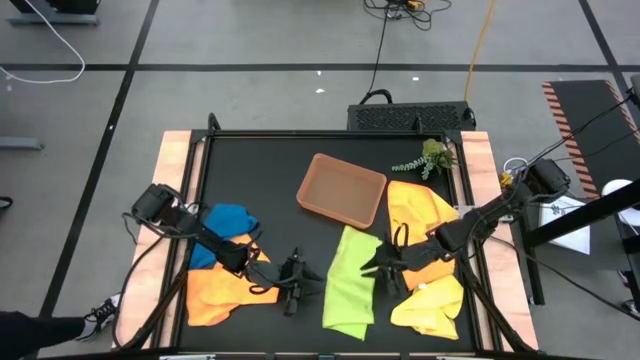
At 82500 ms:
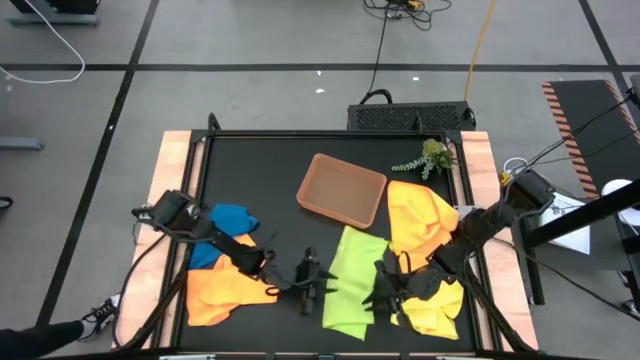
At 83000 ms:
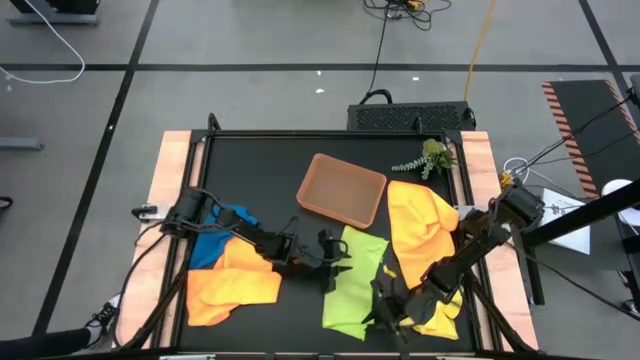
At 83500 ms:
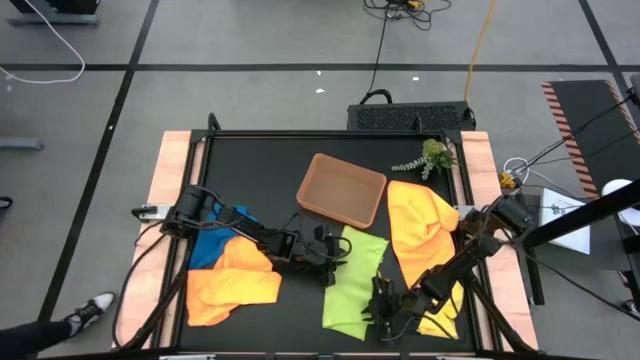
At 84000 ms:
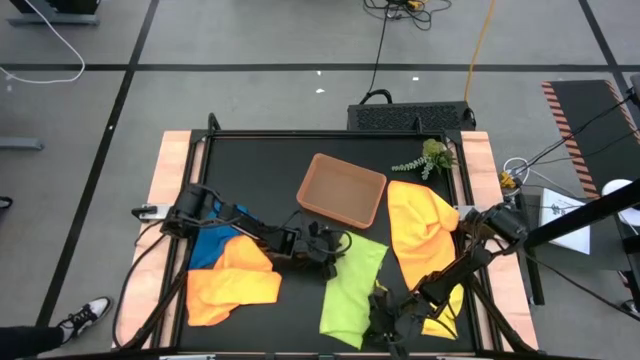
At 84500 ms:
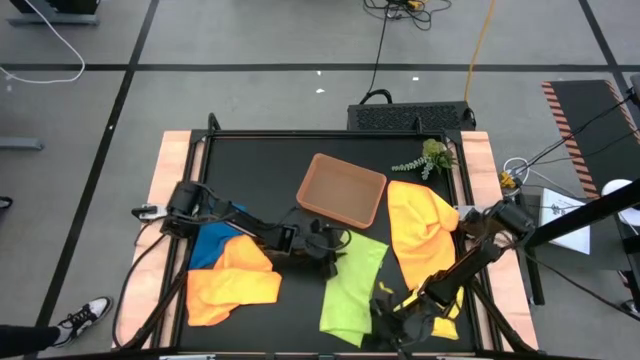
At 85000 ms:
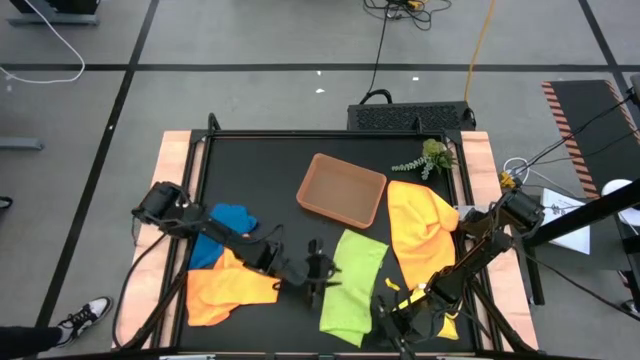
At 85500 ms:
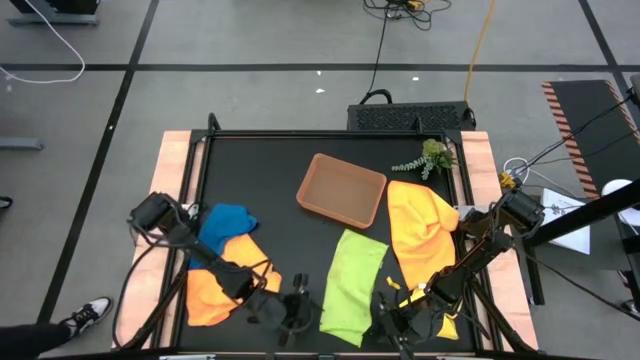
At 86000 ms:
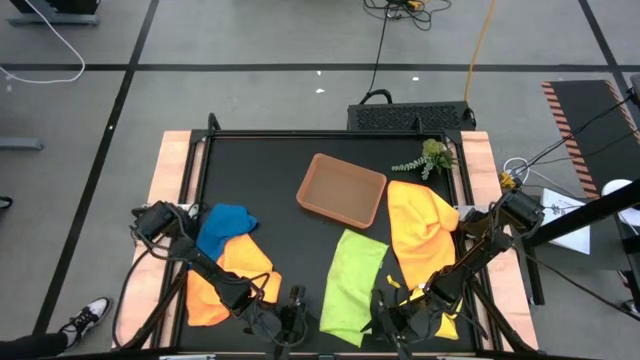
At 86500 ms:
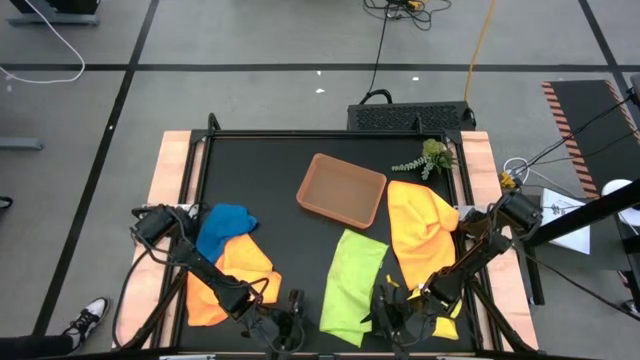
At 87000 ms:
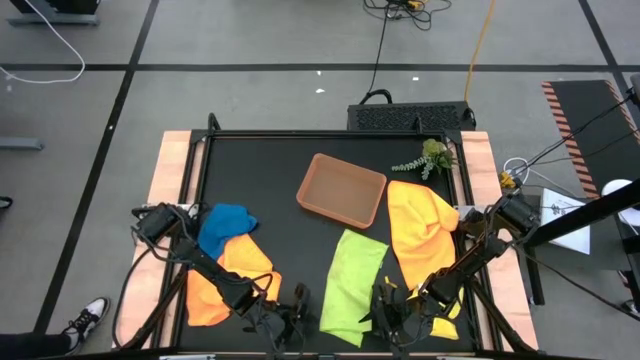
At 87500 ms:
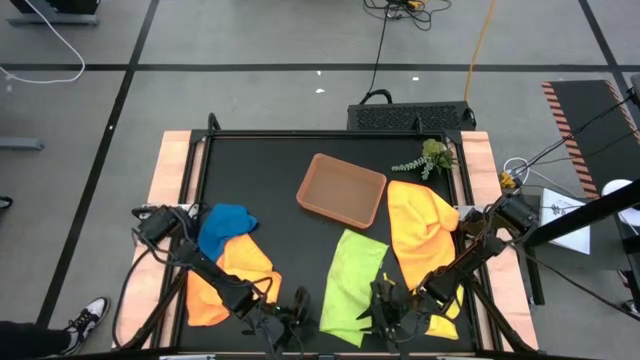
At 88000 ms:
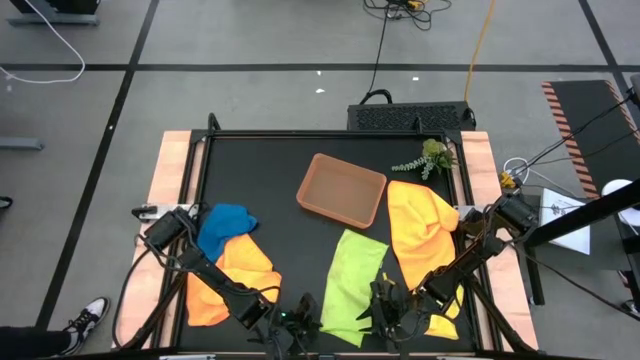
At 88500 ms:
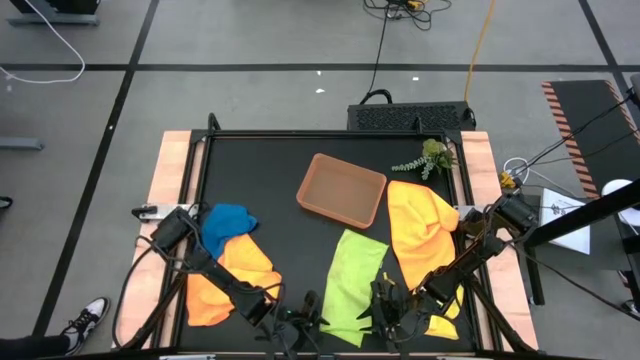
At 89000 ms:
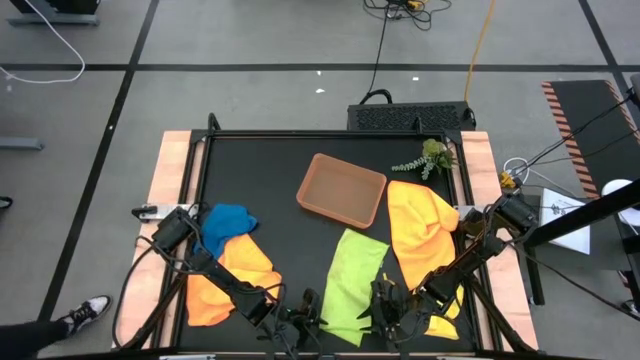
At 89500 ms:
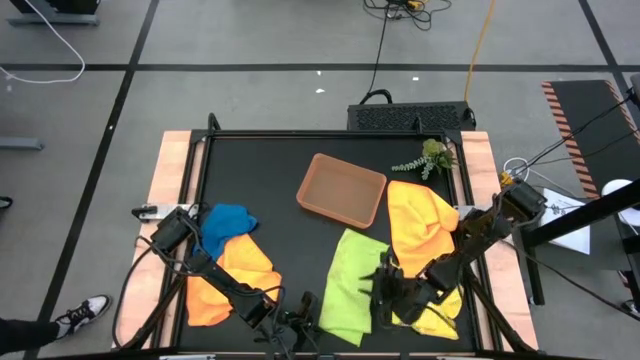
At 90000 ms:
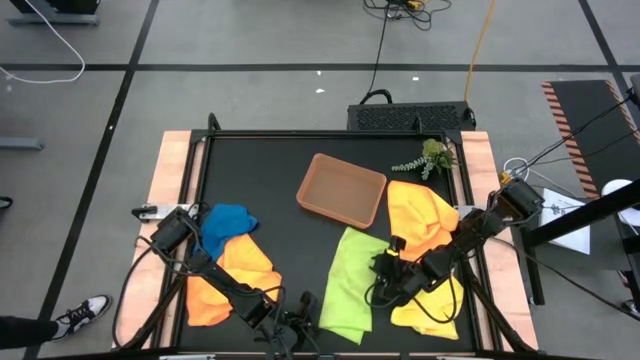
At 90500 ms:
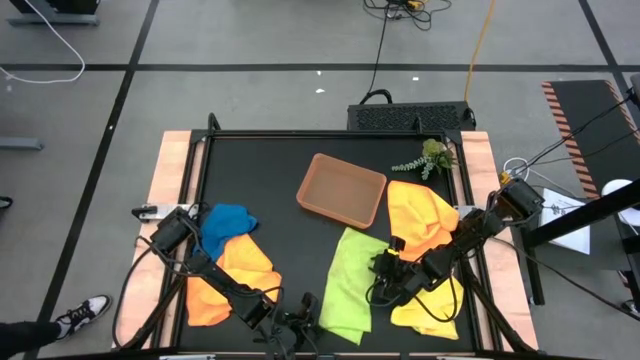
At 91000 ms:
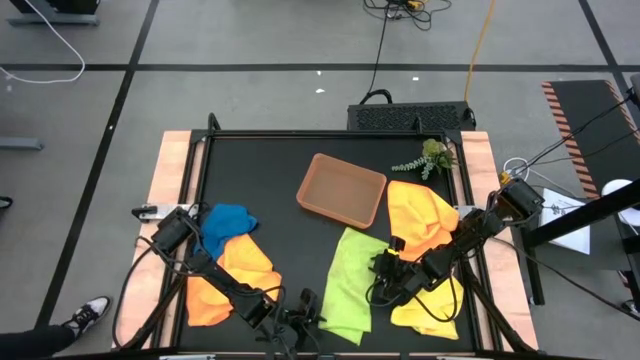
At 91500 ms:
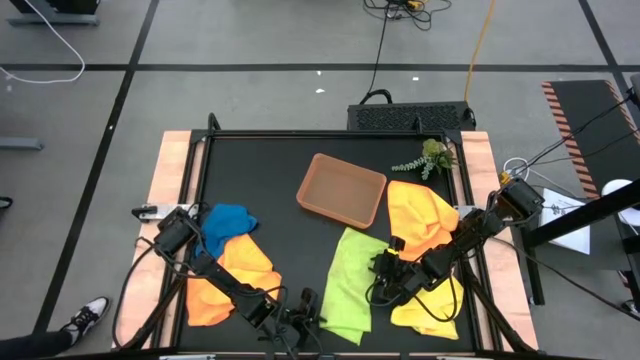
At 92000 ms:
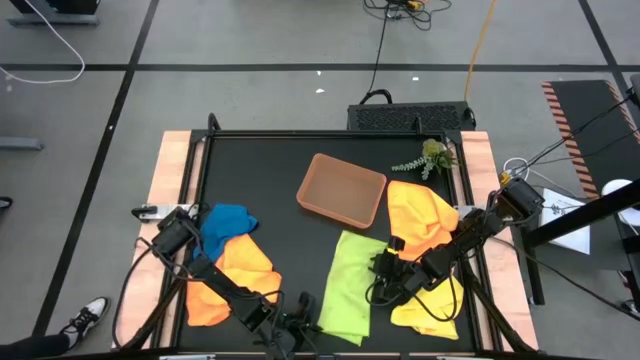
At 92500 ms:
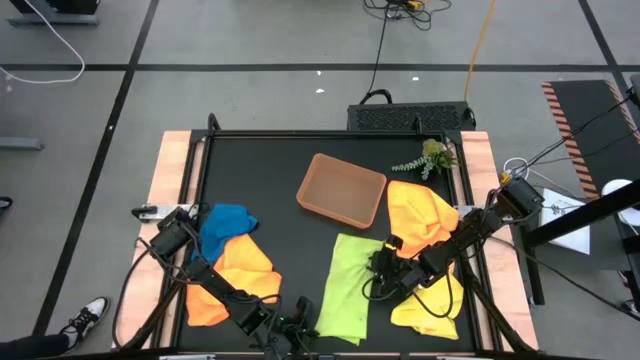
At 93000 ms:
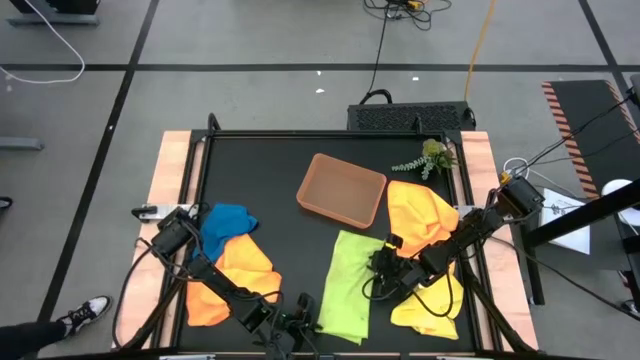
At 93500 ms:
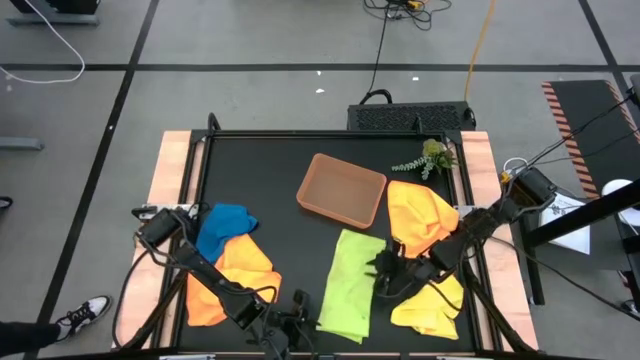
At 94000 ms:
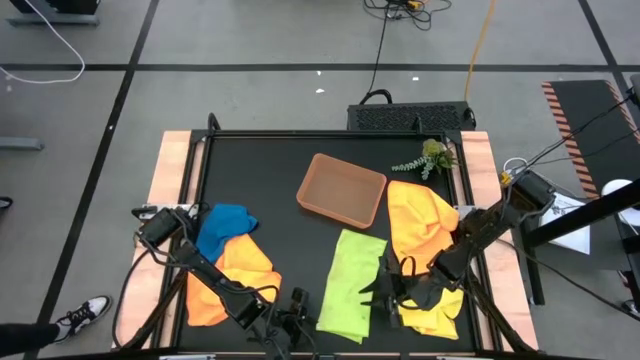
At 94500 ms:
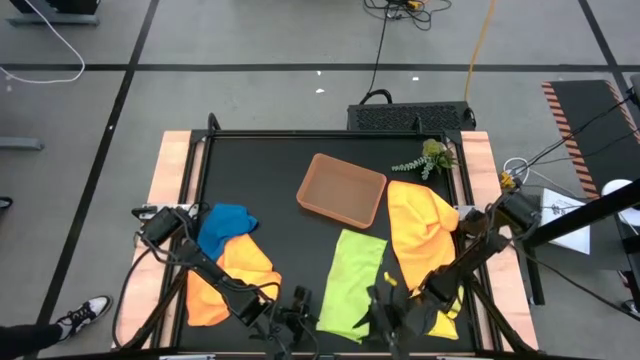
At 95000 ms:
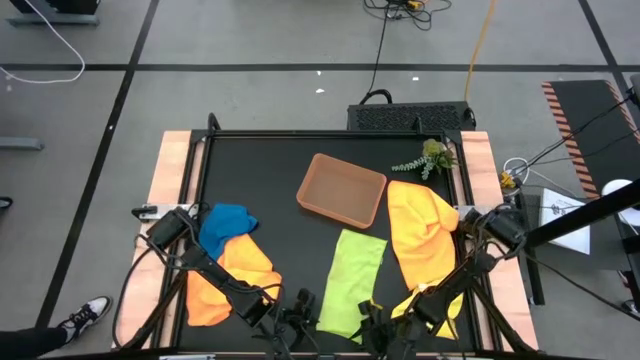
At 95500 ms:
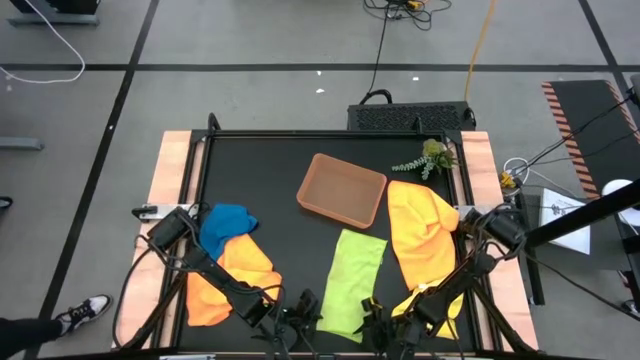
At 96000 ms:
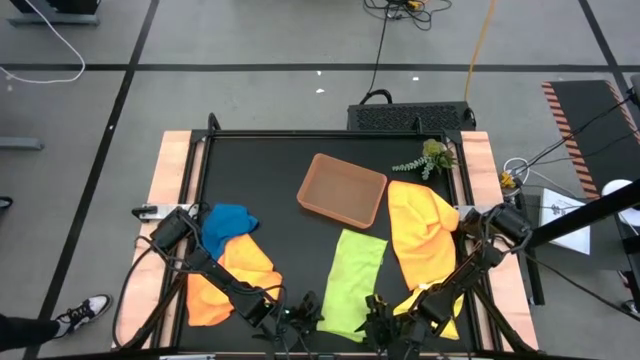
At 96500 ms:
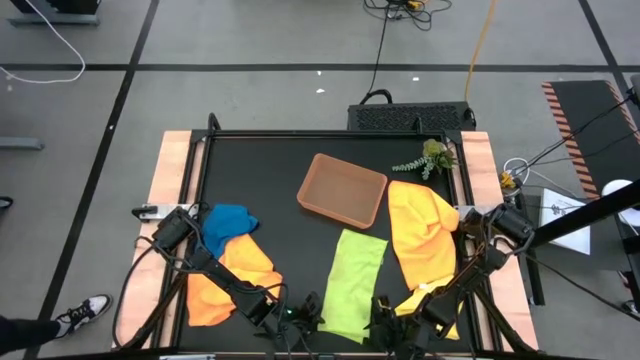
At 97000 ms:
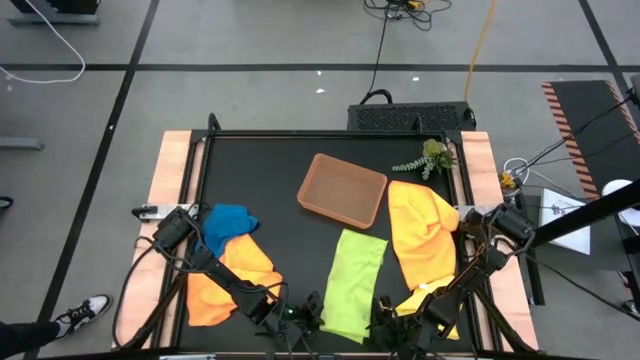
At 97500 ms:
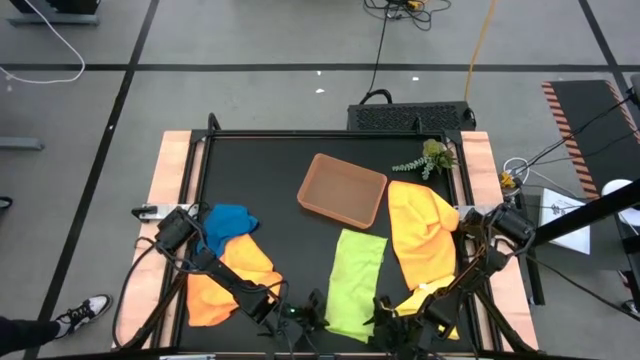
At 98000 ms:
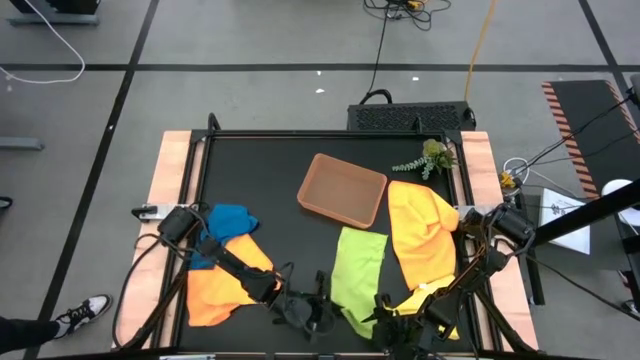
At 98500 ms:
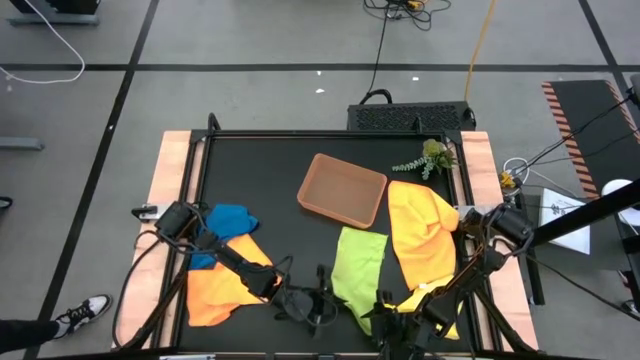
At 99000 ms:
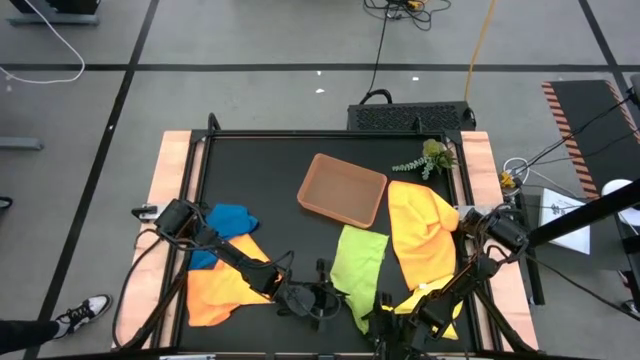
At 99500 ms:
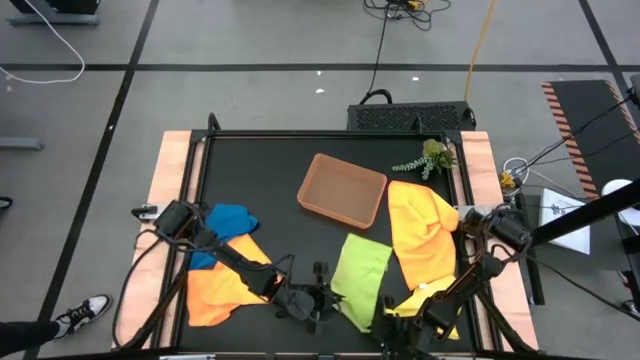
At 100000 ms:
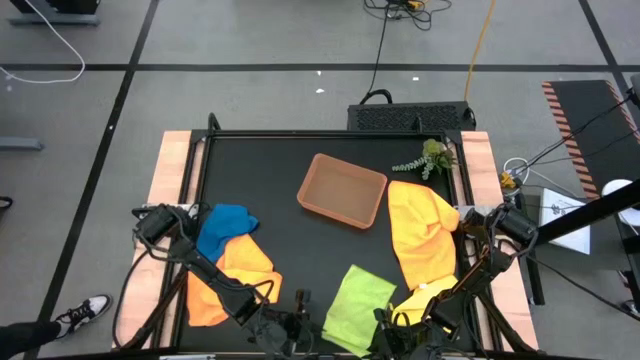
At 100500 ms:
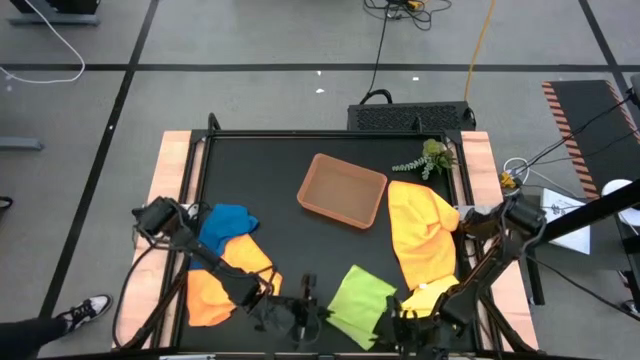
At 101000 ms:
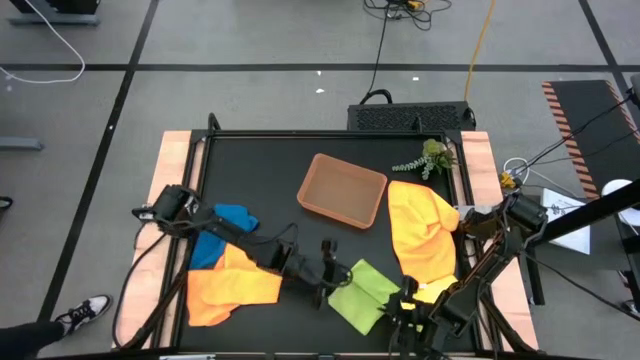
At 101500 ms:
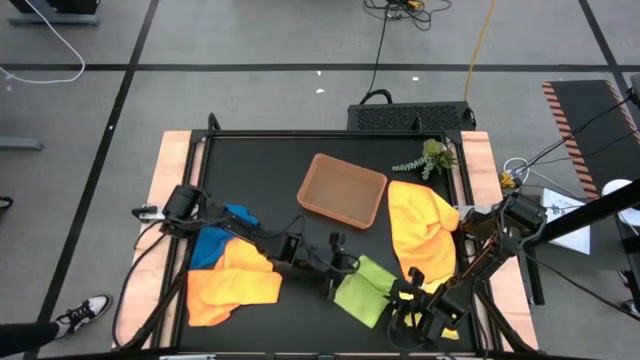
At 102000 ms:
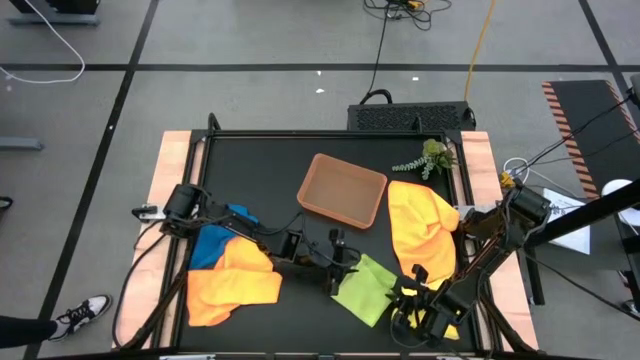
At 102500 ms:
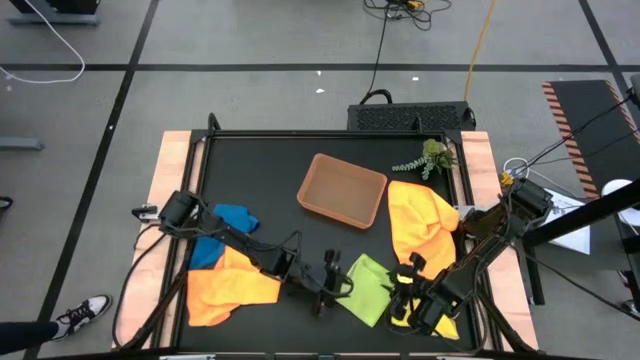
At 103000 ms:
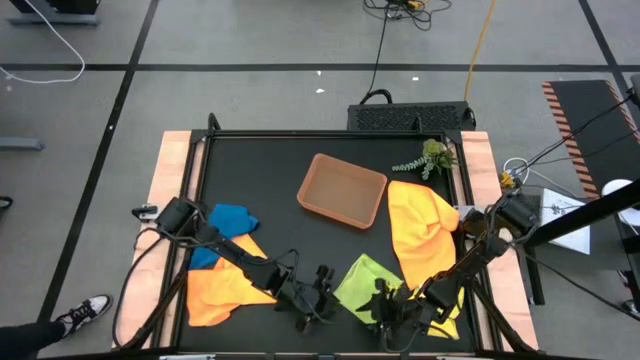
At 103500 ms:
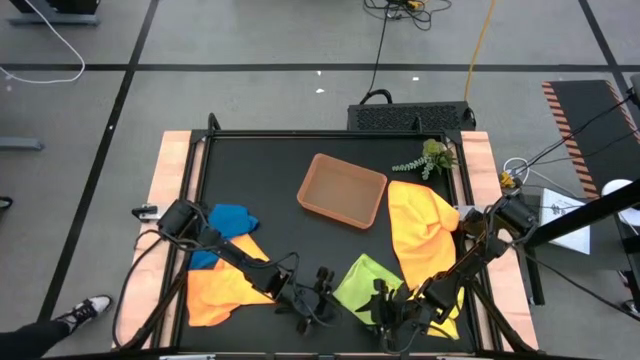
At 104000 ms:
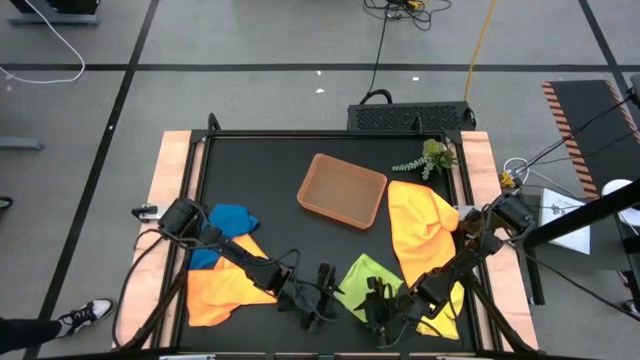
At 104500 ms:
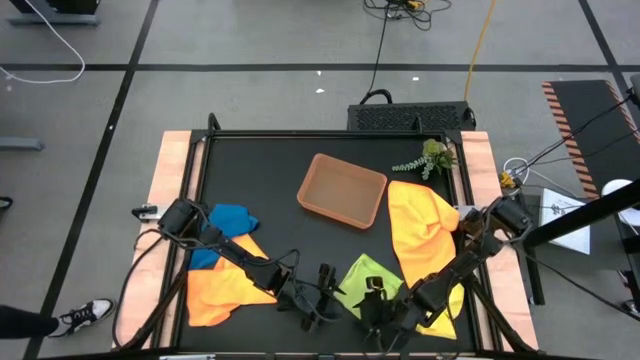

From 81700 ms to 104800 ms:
Task: Fold microfiber towels
Fold the green microfiber towel
